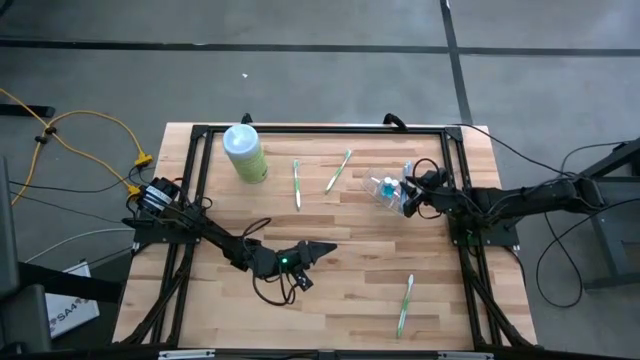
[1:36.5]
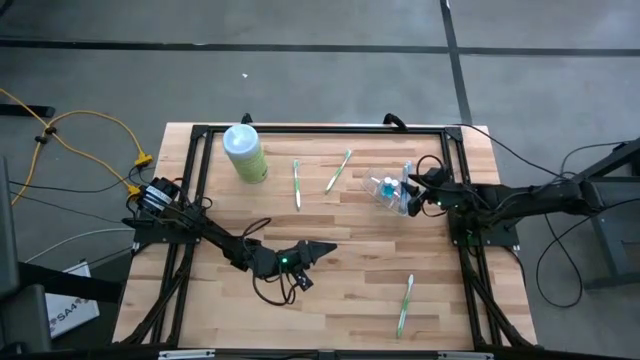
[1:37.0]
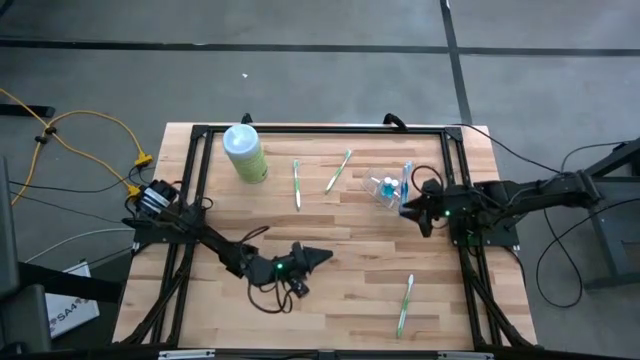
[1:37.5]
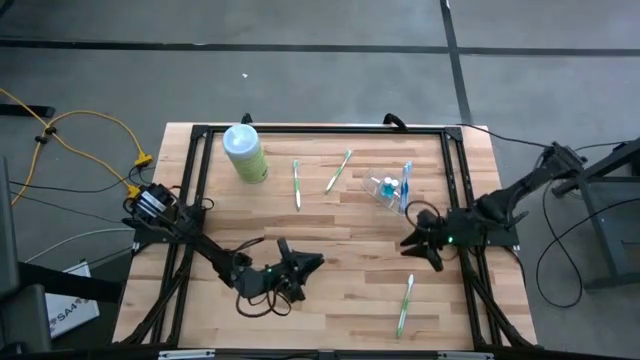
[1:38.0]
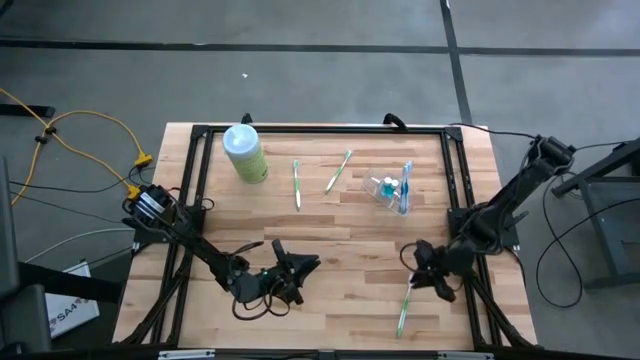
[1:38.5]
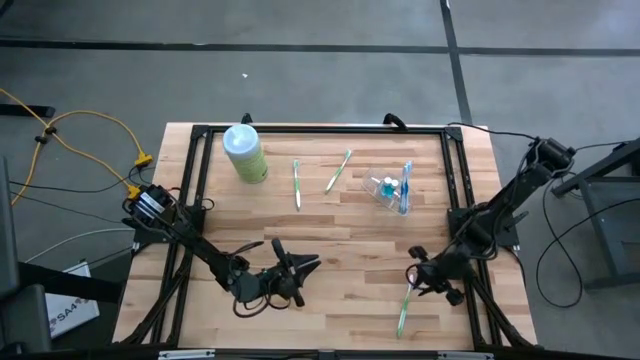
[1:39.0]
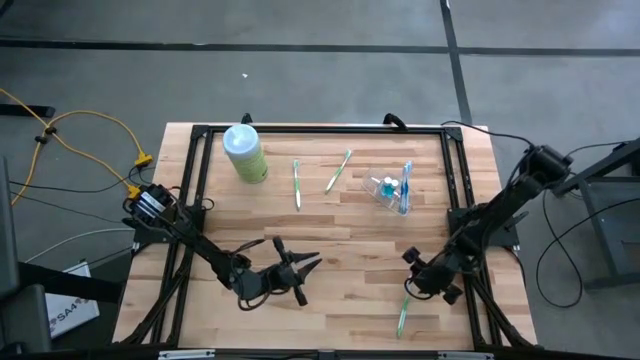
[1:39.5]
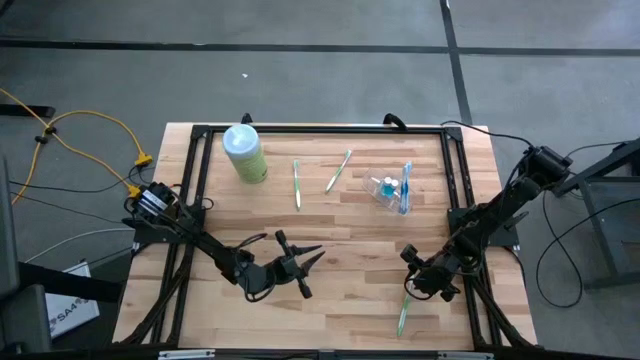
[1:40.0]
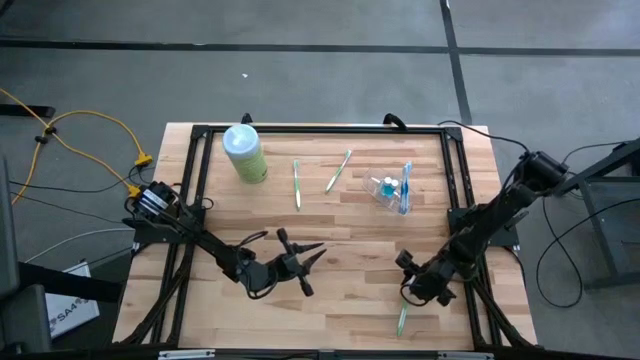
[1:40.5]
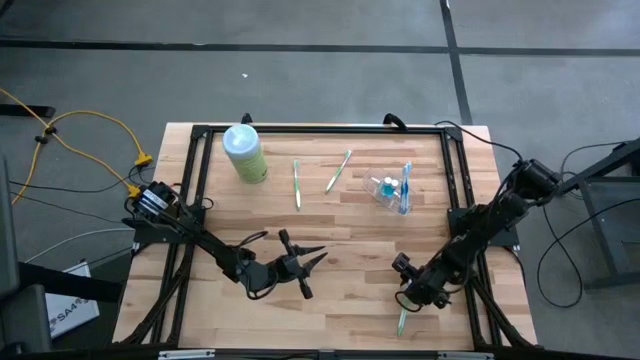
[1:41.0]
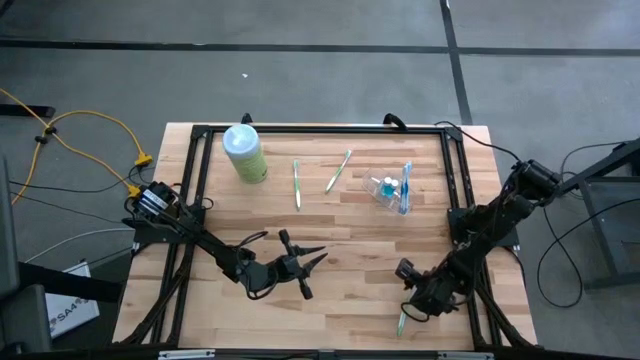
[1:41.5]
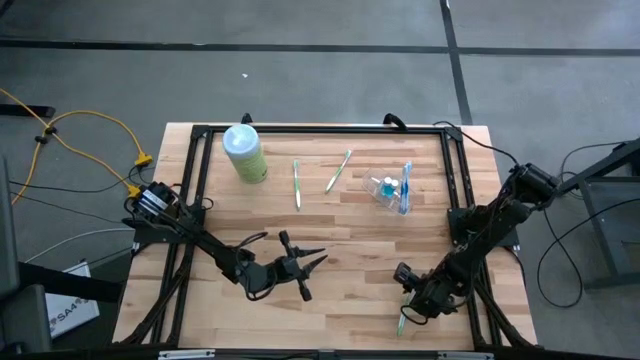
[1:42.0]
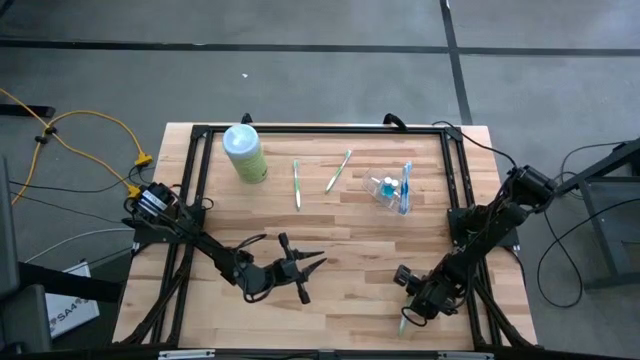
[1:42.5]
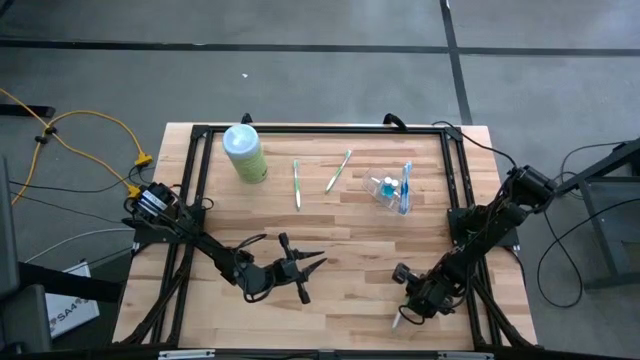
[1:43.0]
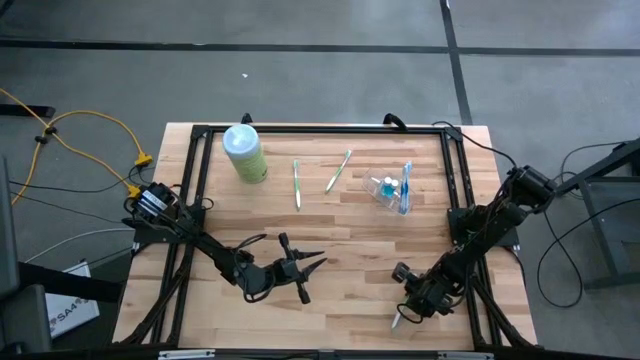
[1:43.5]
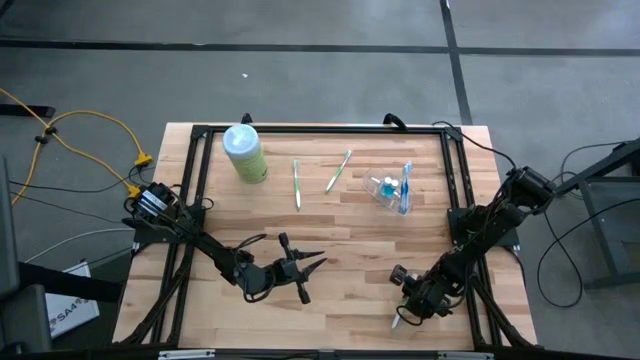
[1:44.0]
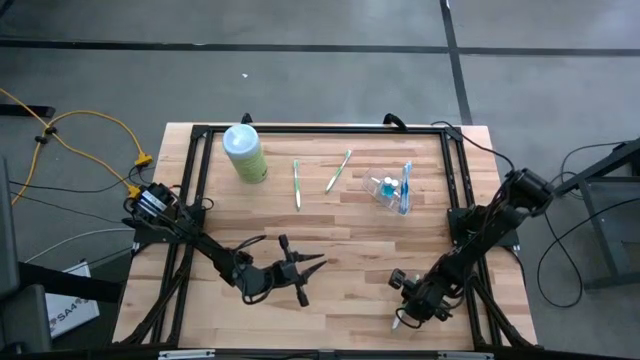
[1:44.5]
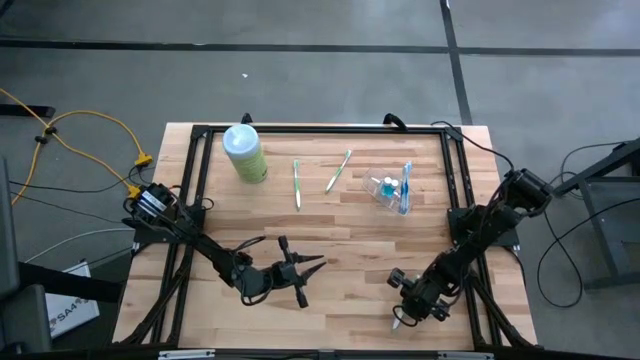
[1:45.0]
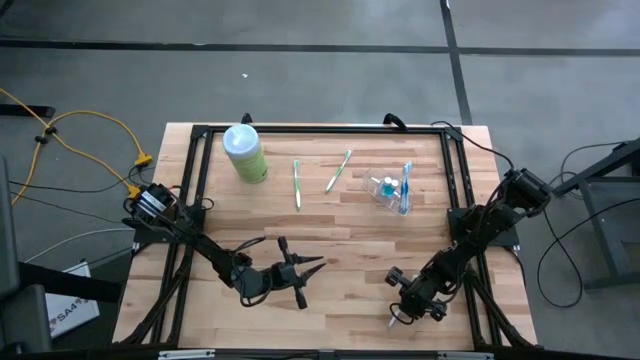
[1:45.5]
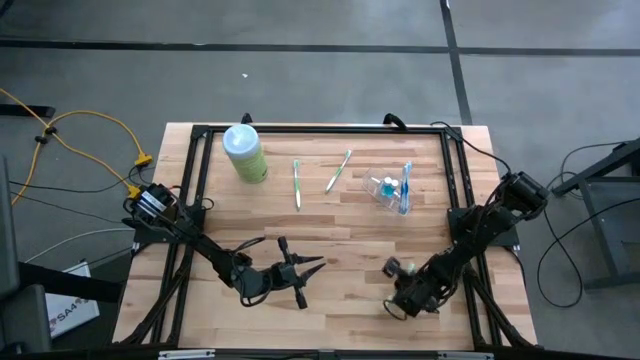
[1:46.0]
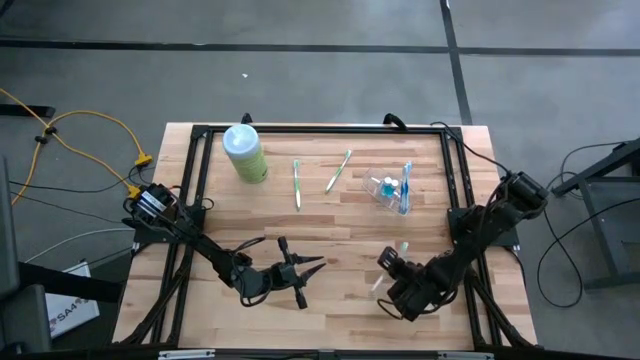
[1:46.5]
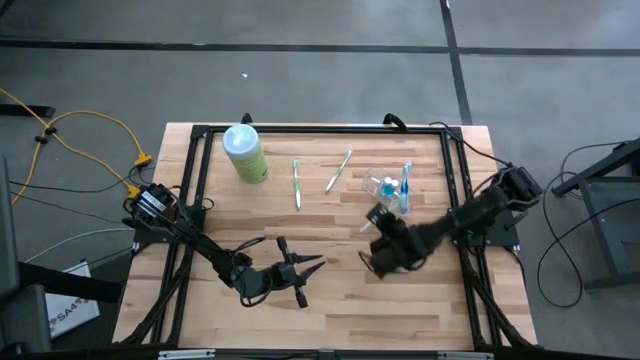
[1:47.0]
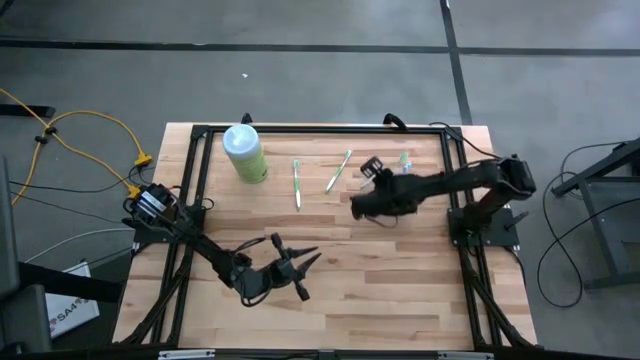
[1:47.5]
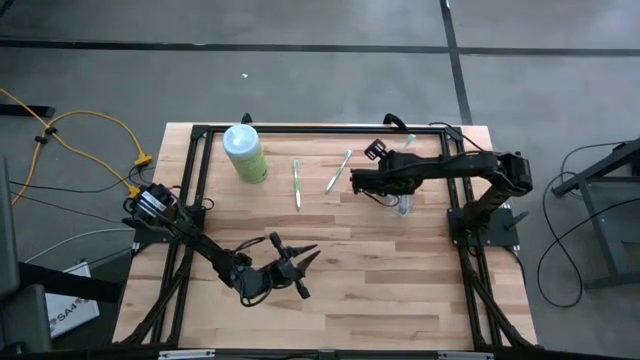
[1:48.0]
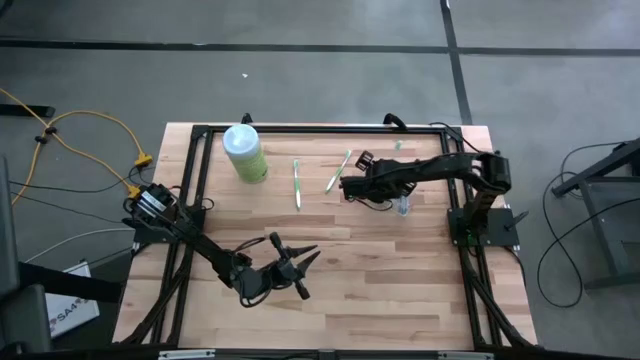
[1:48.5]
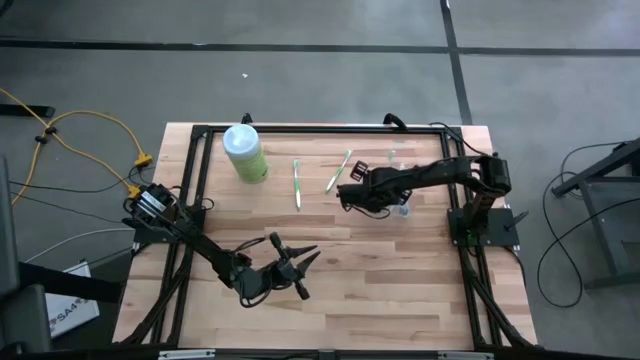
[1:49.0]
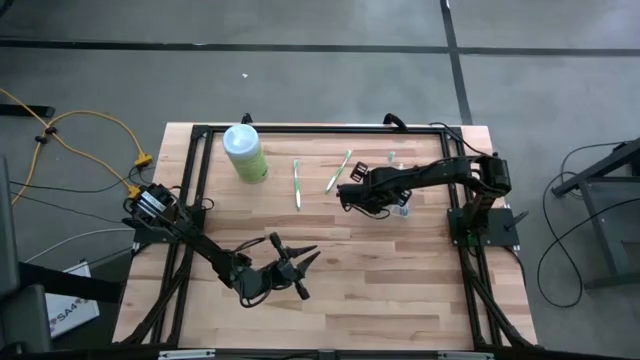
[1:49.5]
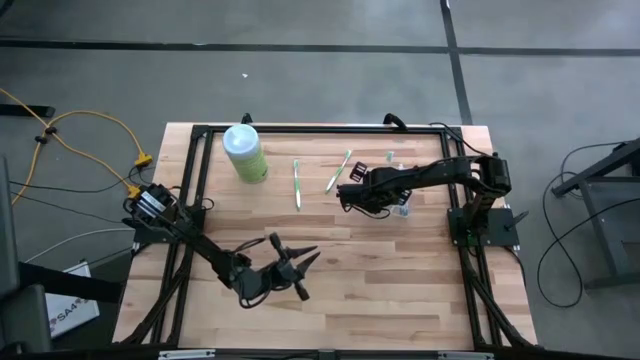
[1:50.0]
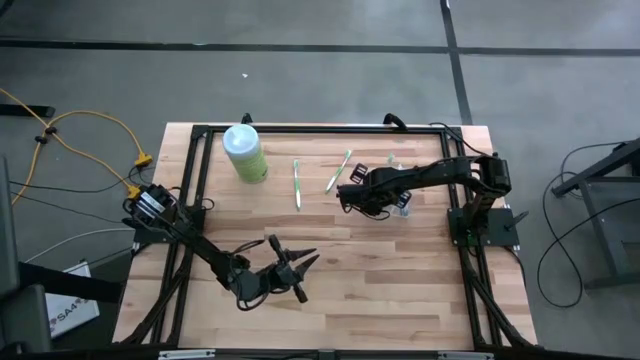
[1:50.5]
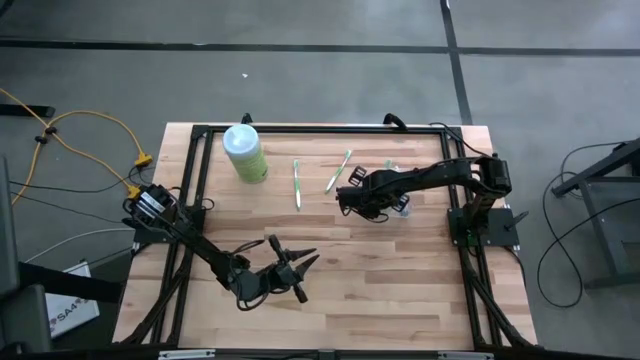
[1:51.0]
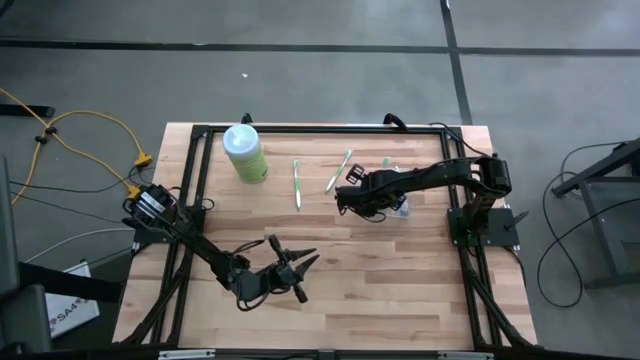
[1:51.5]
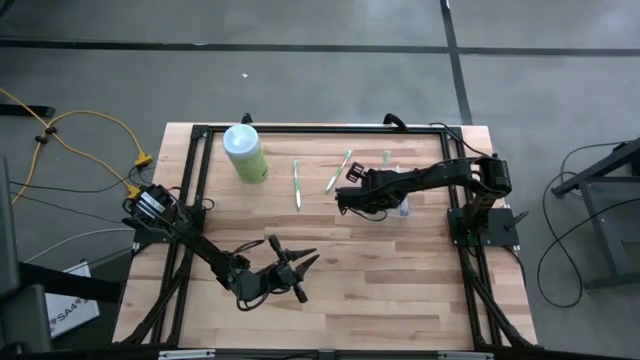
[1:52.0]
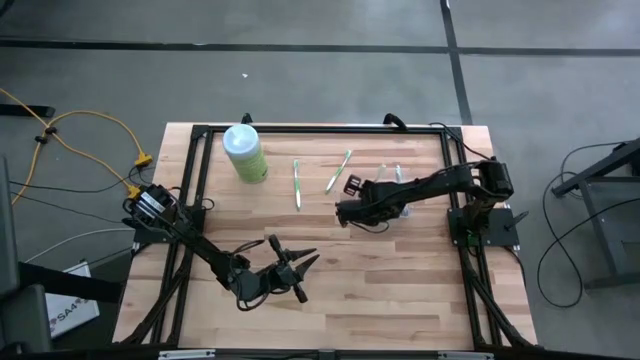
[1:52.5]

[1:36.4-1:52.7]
Task: Pick & Place toothbrushing station
Put the bottom green toothbrush into the left of the transparent organizer

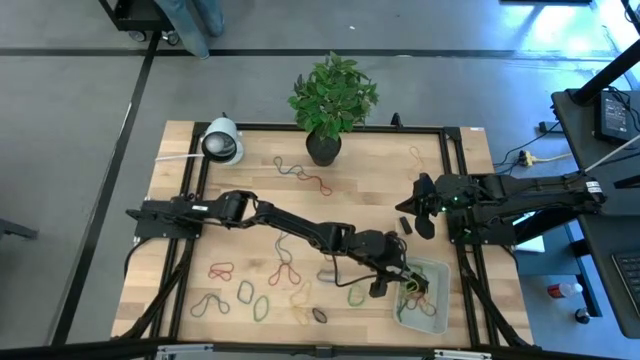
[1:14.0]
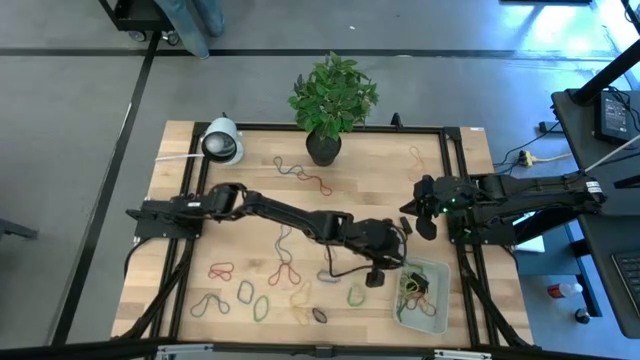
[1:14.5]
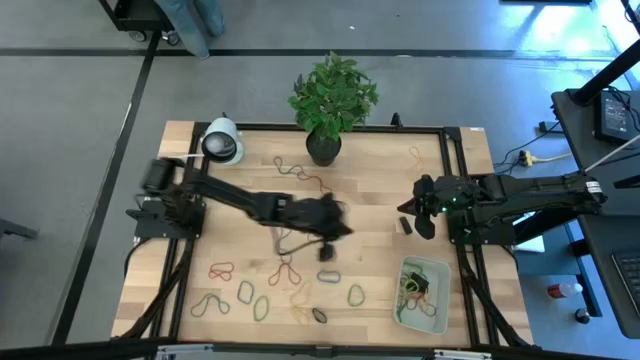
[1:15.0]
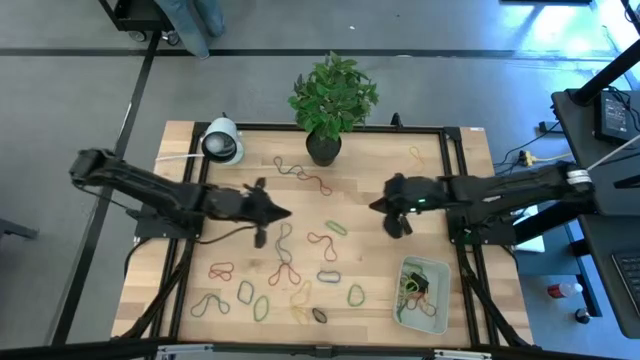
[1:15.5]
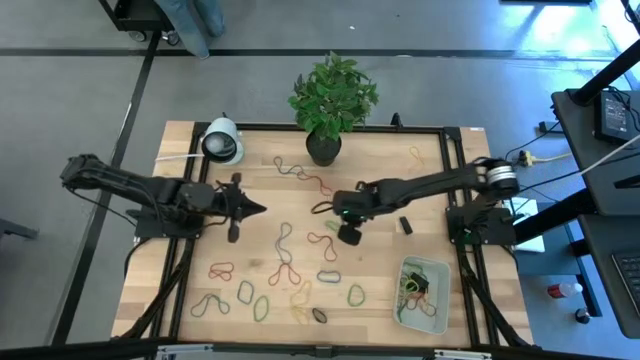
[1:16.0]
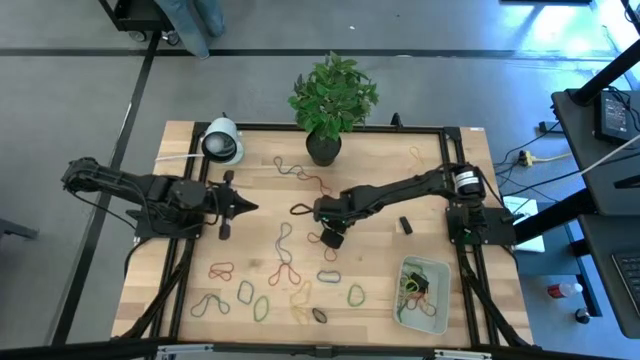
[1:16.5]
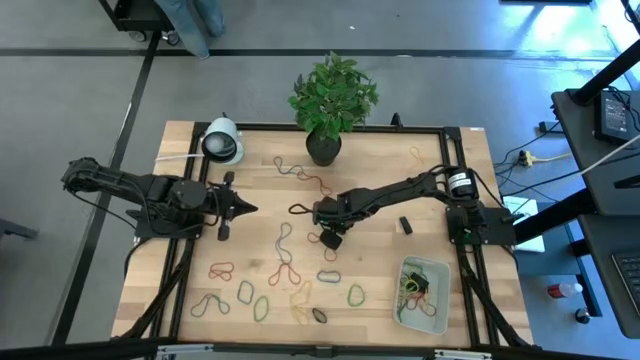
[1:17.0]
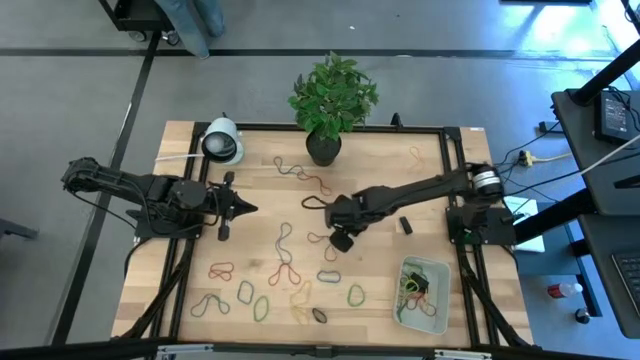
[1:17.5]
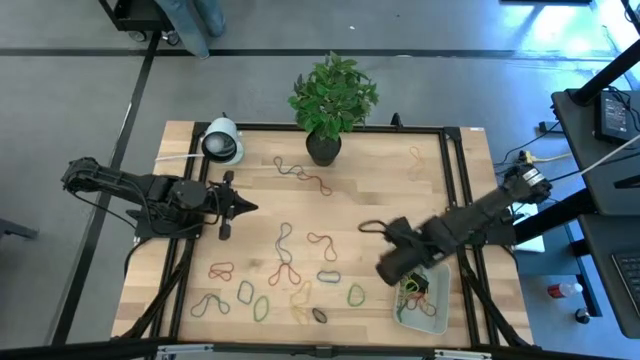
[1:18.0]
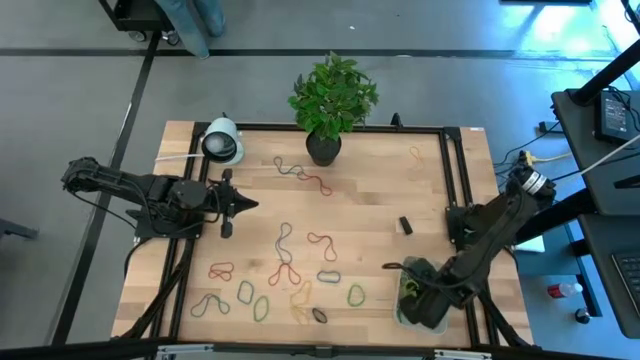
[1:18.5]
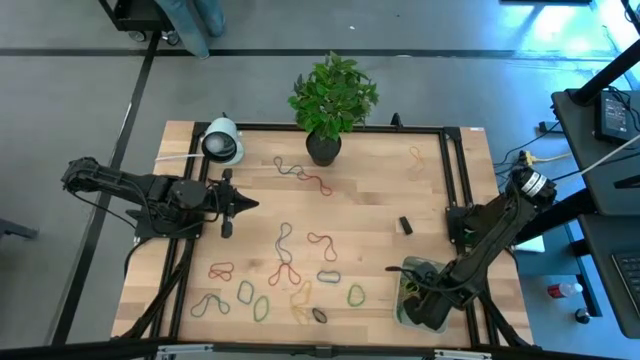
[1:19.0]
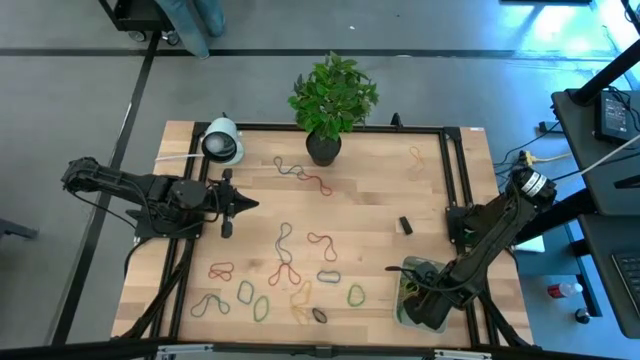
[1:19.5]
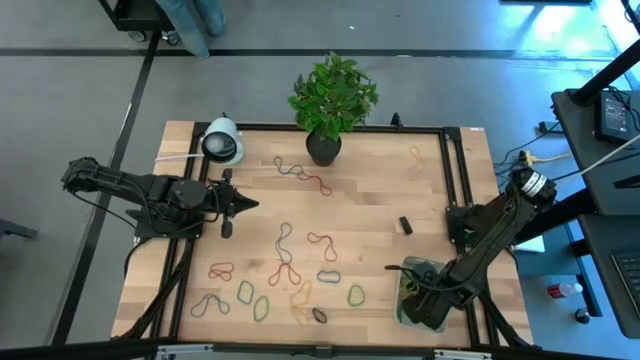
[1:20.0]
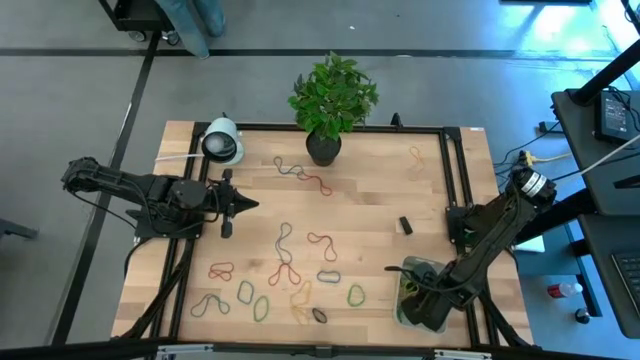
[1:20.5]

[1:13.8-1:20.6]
Task: Pick and place rubber bands into bin
Put the green rubber band into the gray bin
